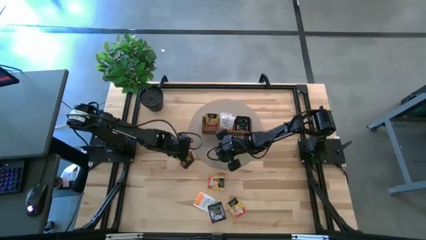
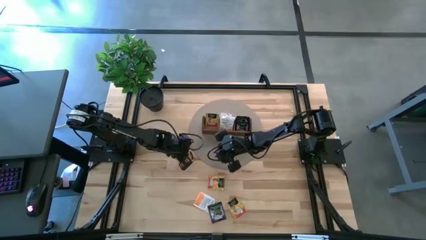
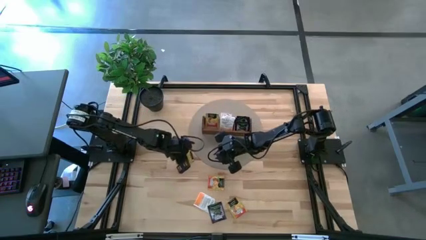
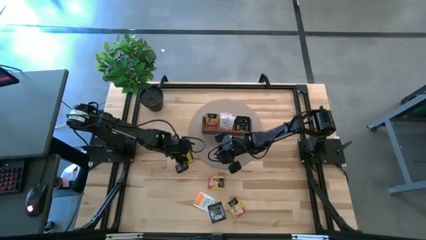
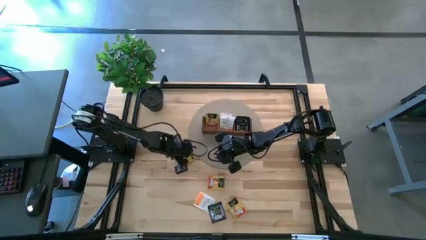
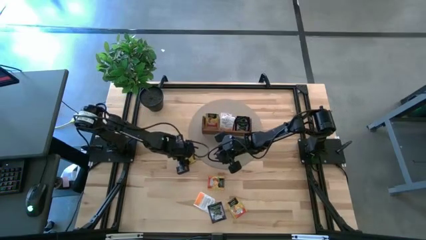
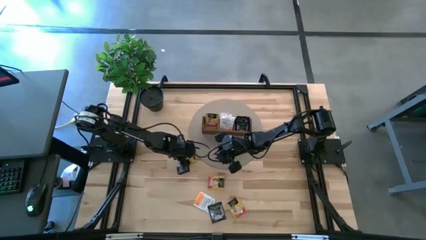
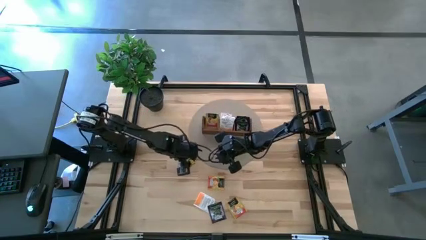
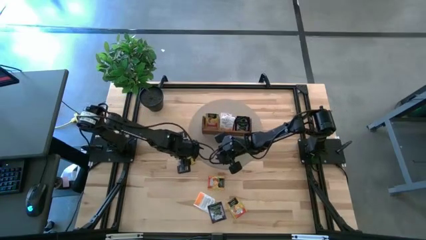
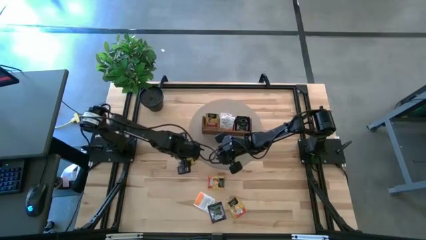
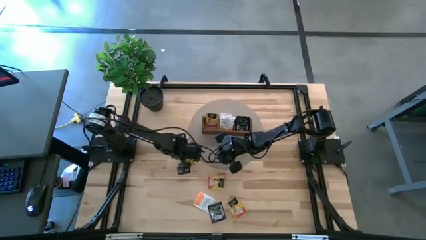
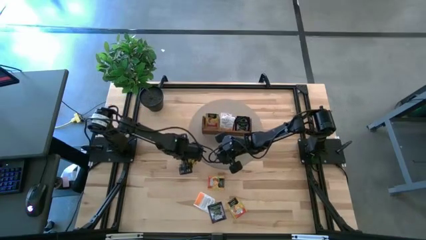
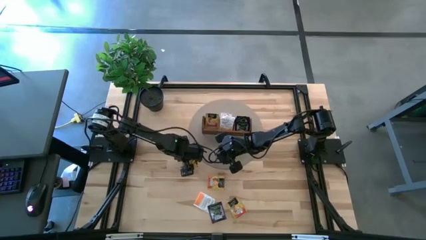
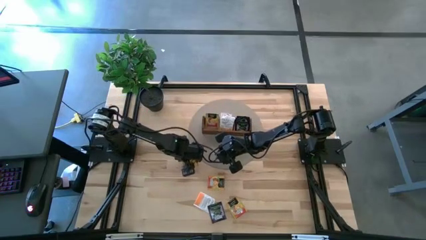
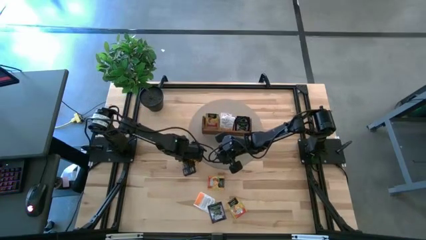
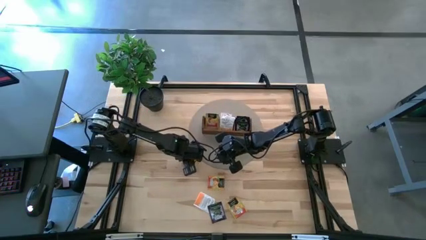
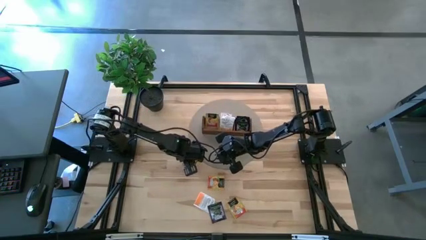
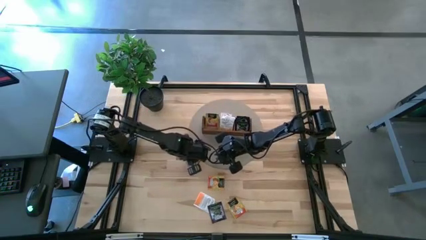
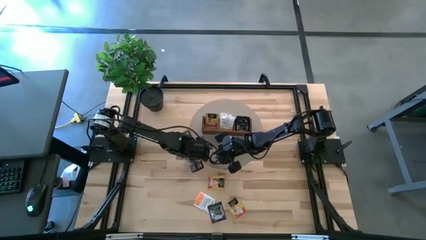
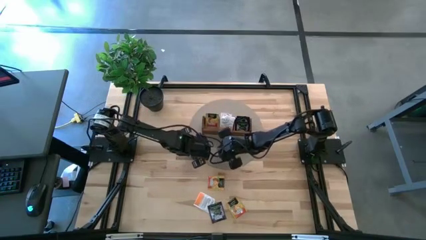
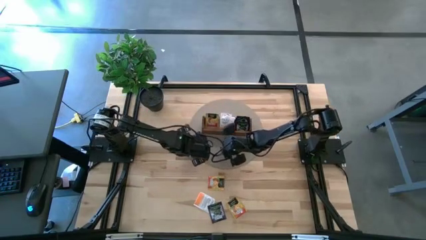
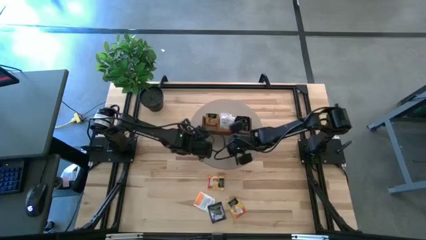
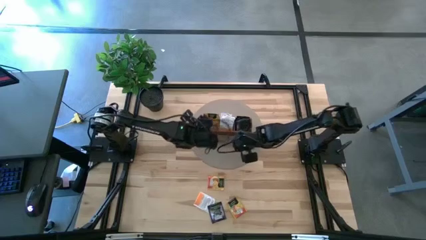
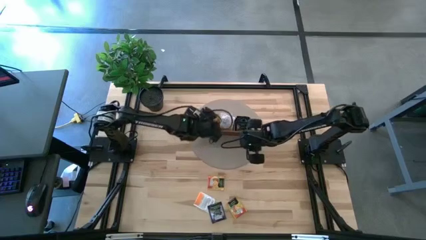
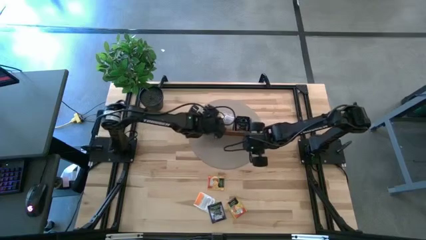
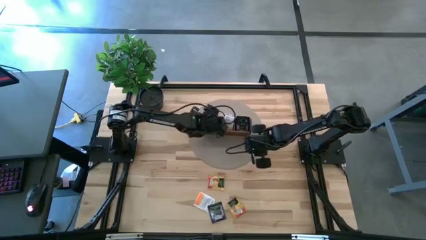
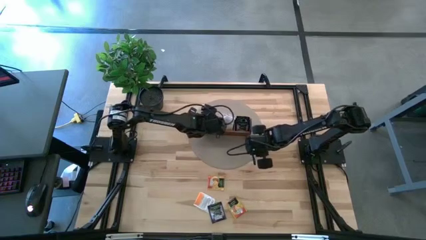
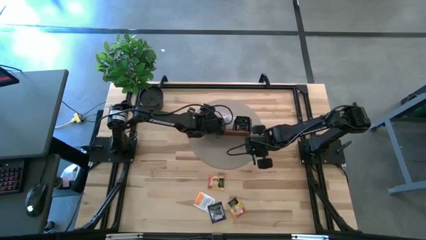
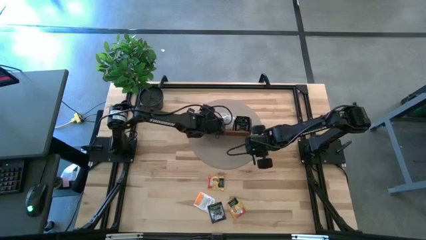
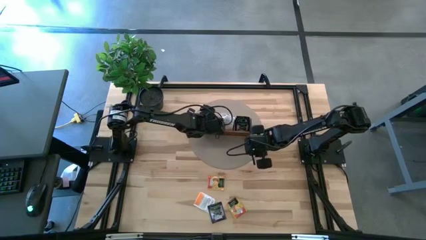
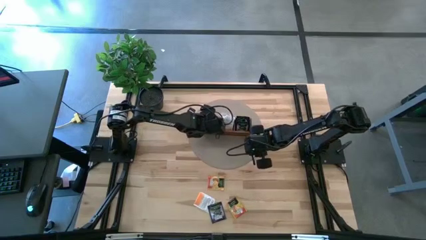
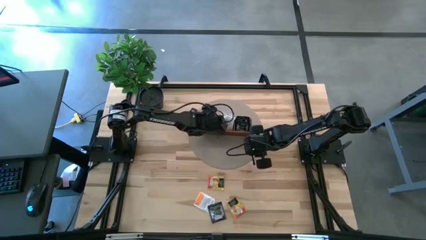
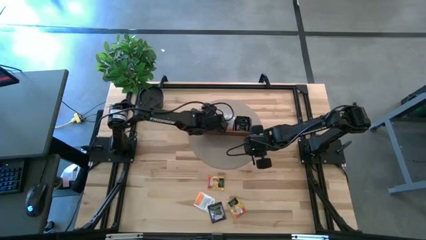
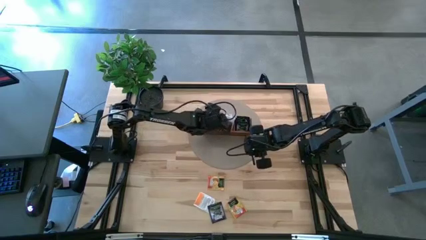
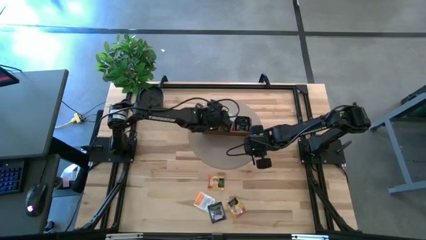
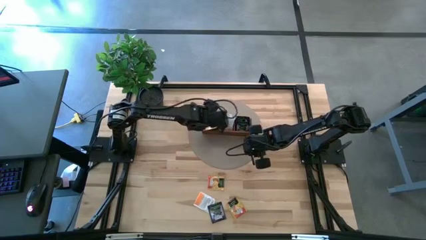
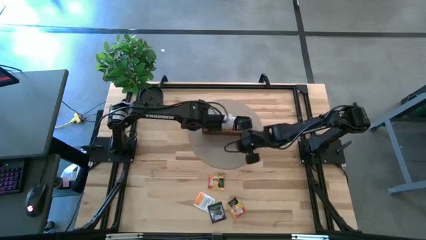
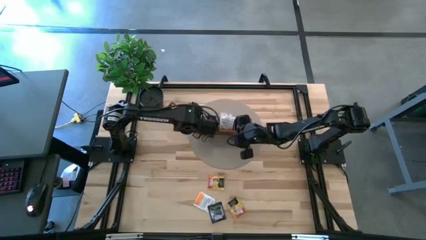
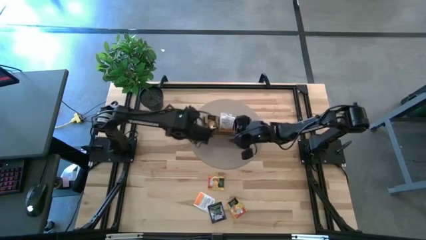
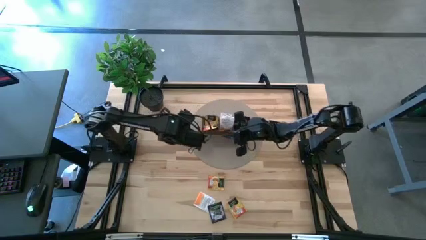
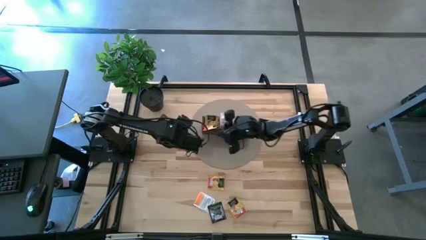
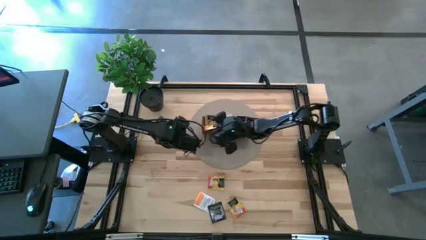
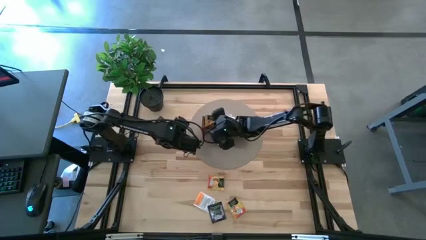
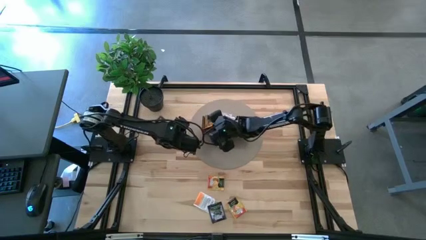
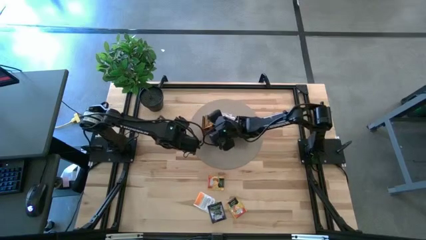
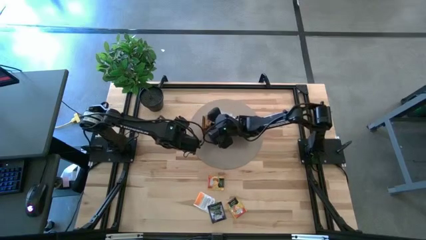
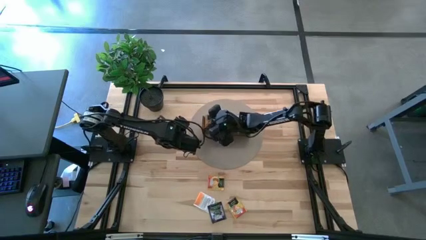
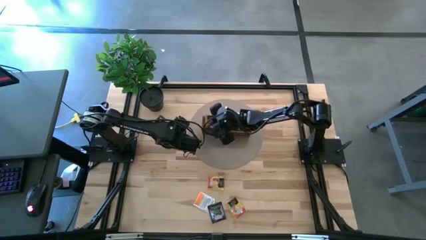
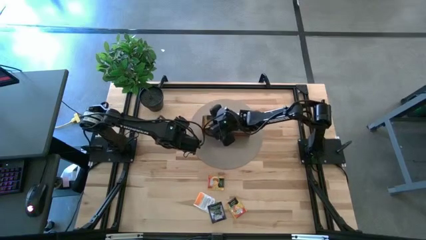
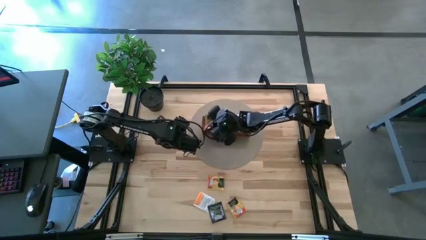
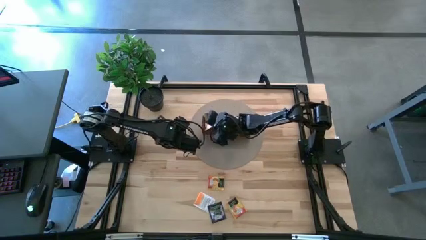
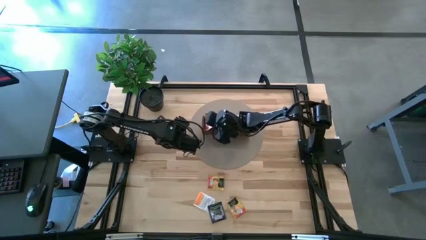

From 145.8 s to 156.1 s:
Task: Pick & Place Tea
Put the yellow tea bag into the left section of the wooden organizer
